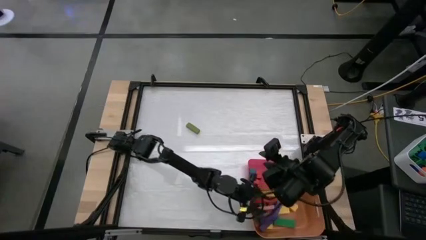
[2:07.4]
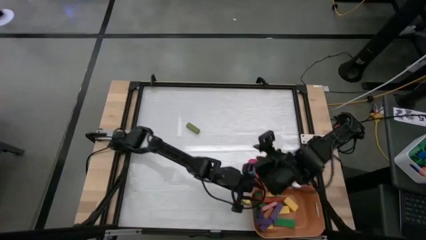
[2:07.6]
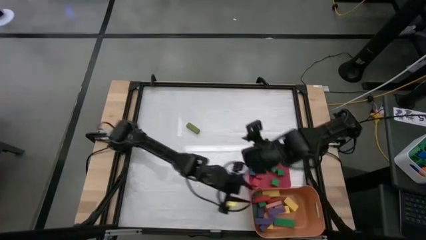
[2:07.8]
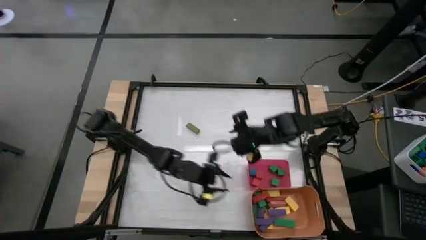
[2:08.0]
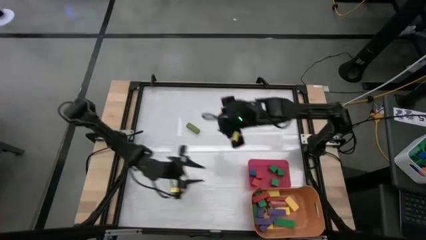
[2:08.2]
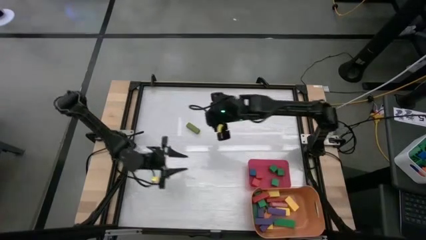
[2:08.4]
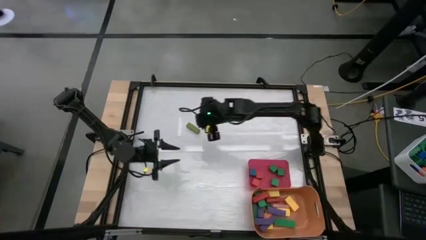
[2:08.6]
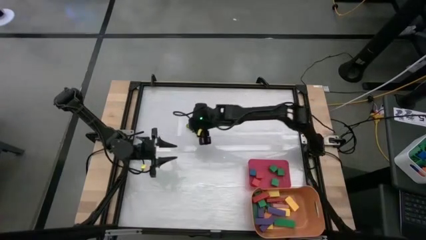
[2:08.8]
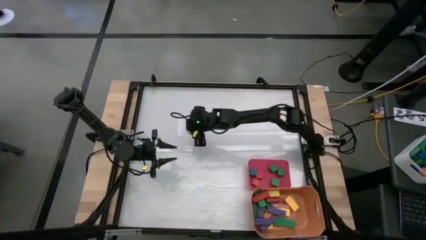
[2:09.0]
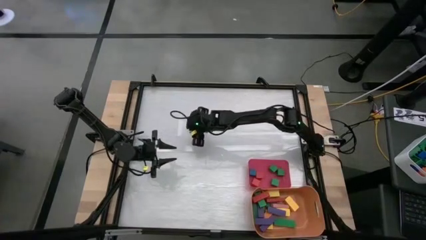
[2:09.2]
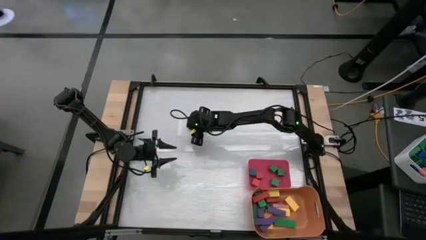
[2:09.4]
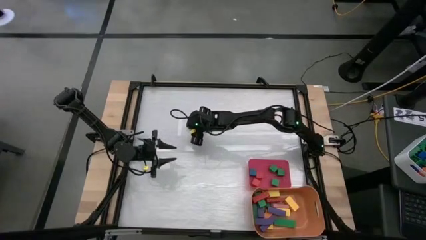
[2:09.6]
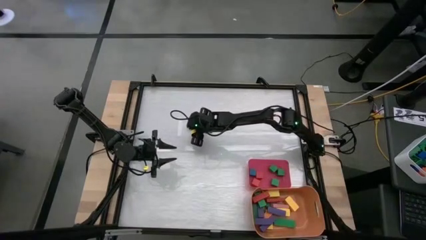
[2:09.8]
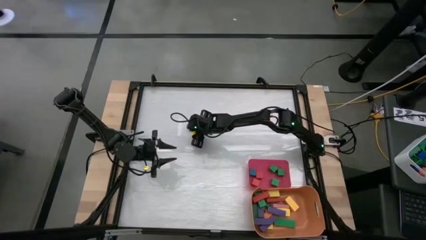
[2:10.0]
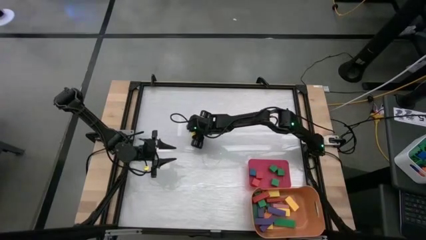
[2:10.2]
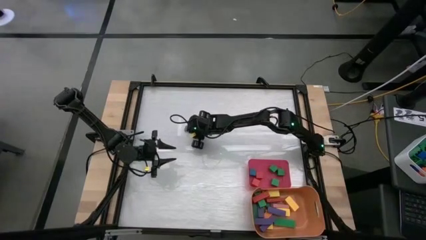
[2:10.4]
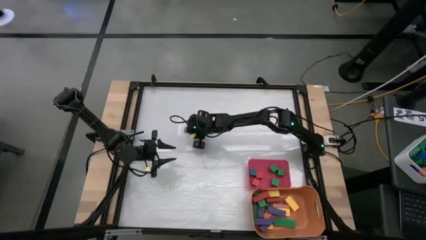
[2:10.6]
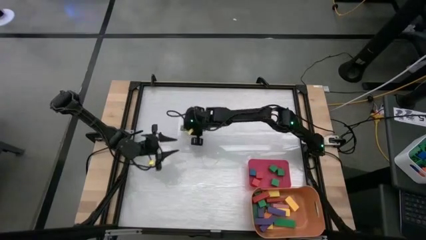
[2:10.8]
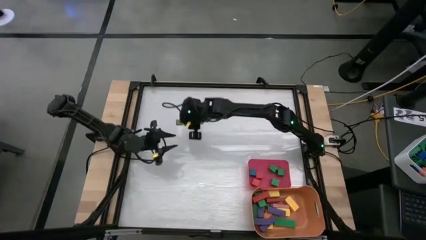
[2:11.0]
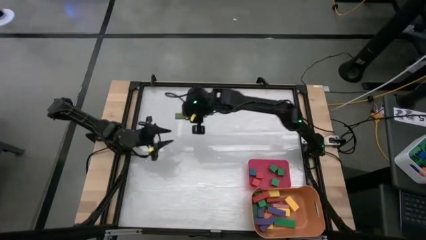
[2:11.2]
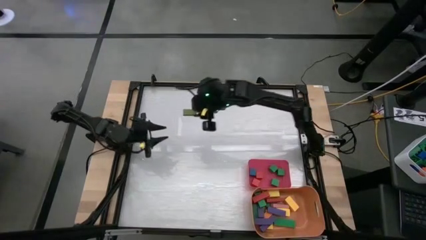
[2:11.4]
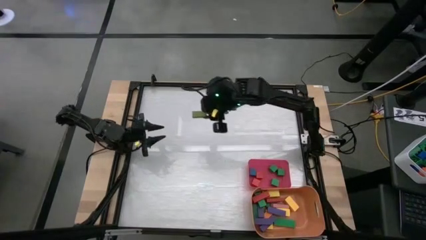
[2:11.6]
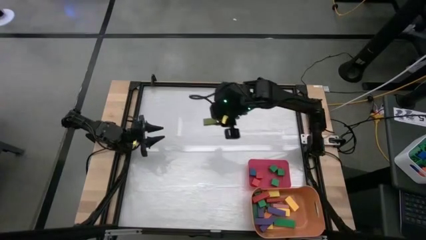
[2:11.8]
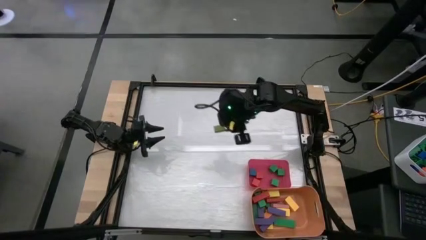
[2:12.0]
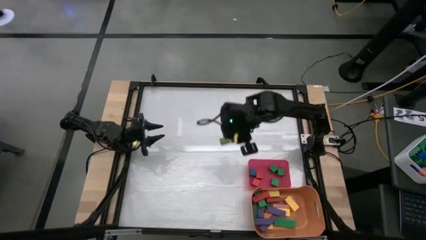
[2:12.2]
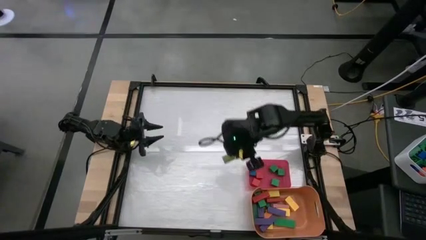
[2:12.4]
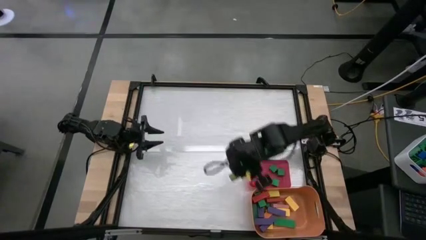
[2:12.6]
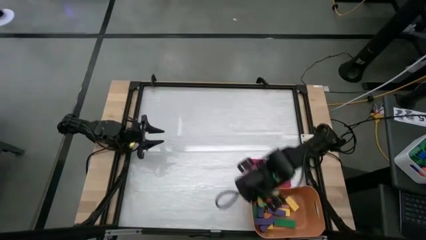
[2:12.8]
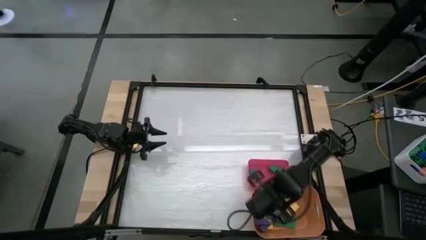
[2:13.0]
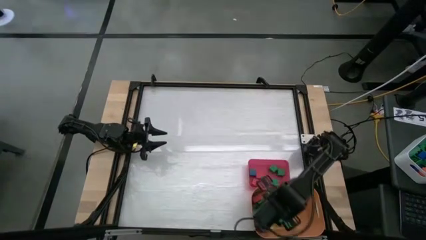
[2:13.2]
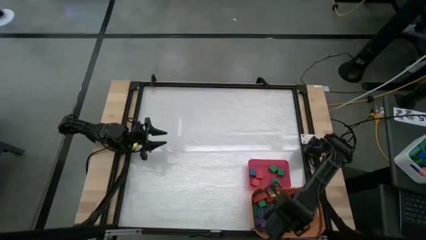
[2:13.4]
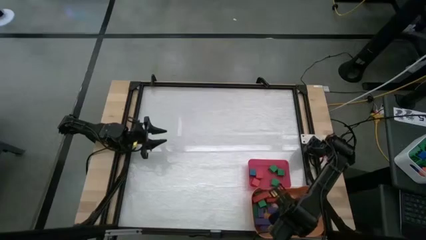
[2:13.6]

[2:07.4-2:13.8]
Task: Sort blocks by size
Put the light green rectangle block into the orange bin

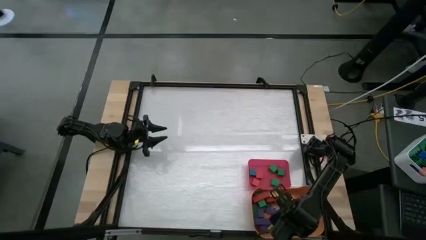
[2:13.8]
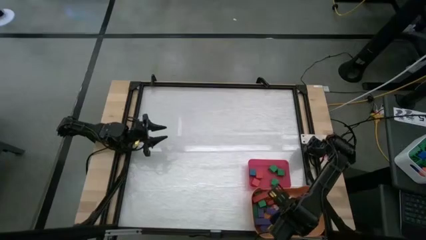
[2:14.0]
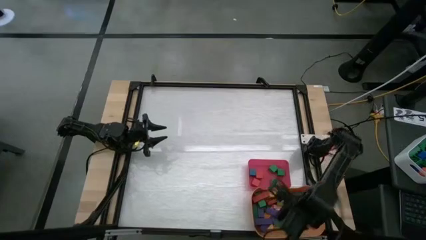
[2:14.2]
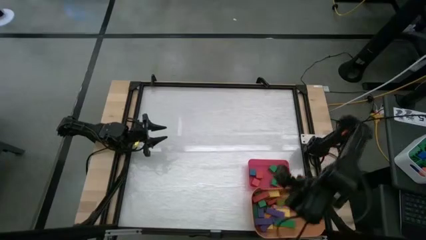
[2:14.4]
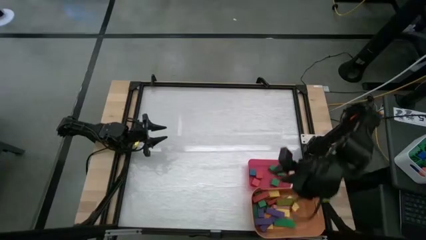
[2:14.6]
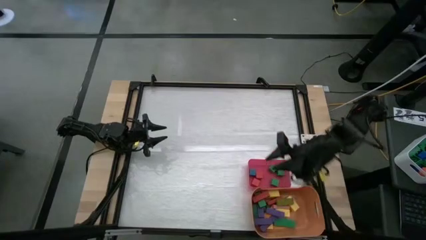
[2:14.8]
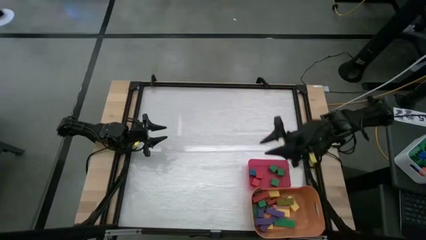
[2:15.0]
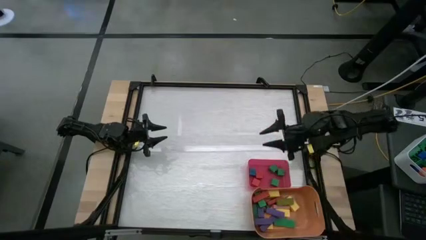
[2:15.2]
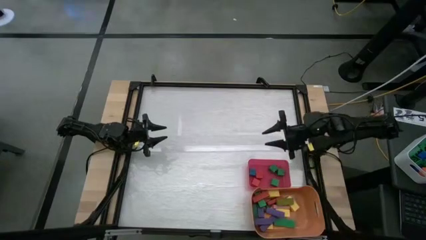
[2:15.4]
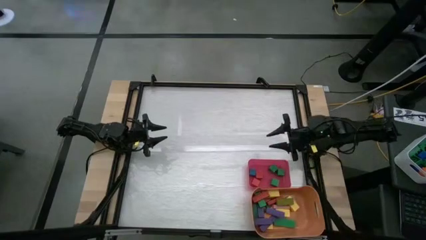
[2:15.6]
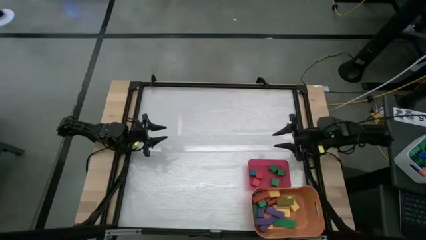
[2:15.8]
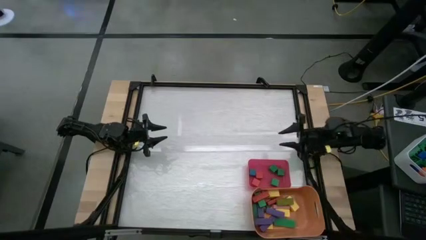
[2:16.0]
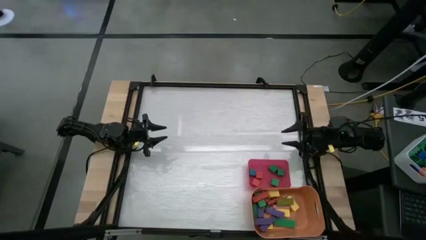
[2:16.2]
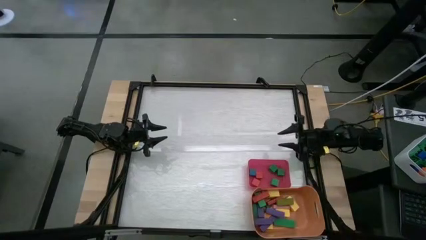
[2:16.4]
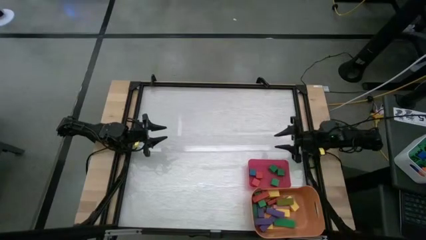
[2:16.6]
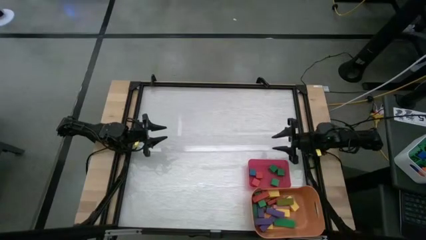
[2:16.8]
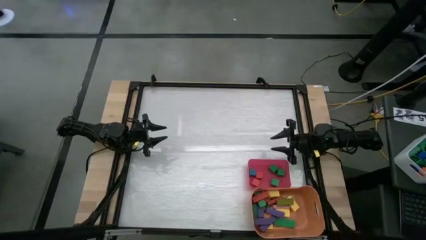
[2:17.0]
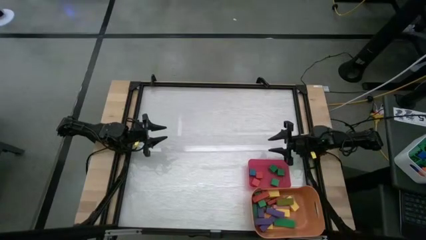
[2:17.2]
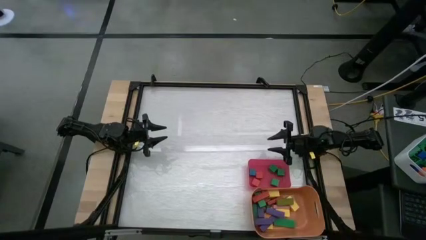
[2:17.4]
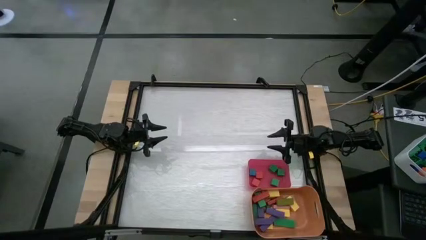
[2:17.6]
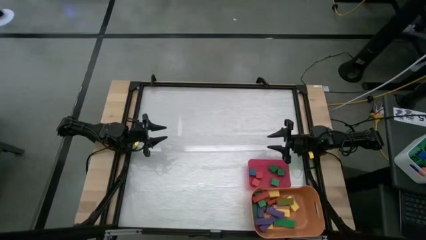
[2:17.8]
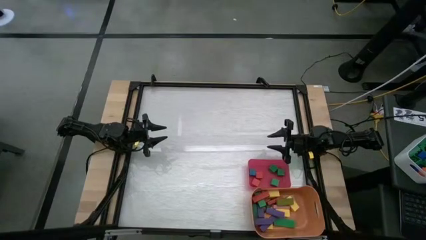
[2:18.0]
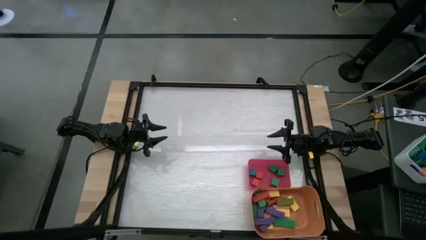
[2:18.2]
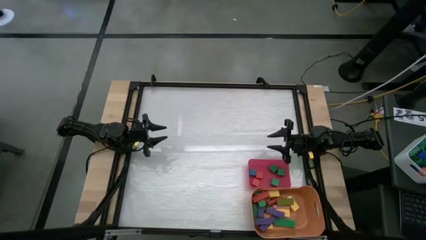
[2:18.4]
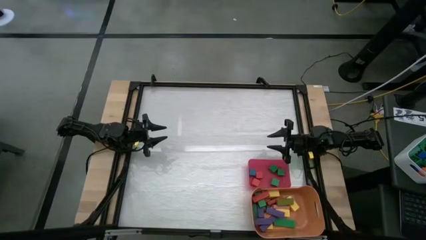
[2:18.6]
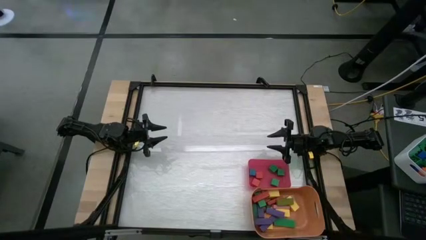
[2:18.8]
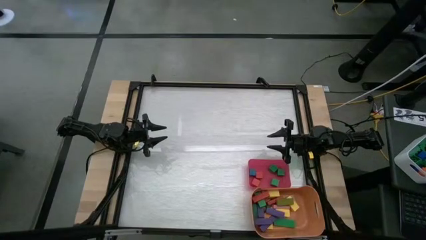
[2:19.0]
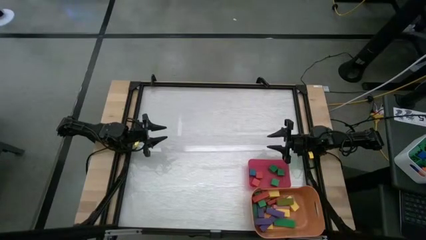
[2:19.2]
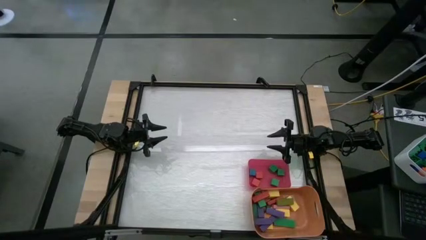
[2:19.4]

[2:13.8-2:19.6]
Return to Home Position

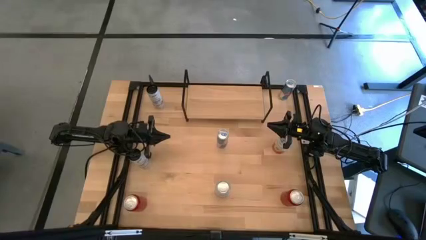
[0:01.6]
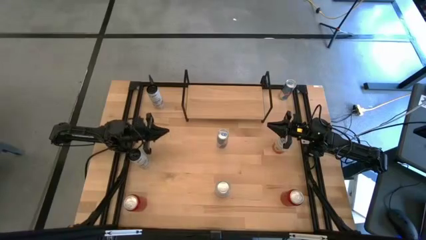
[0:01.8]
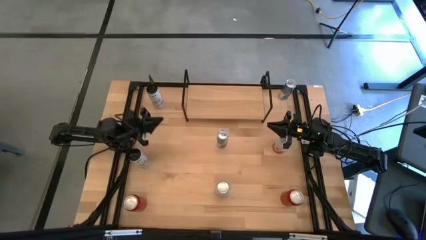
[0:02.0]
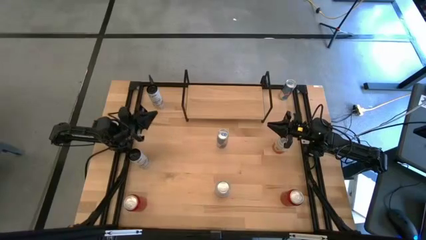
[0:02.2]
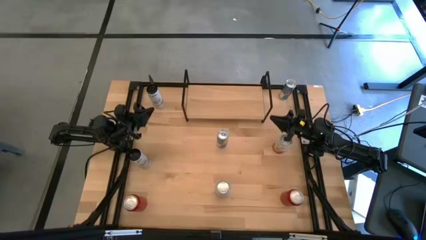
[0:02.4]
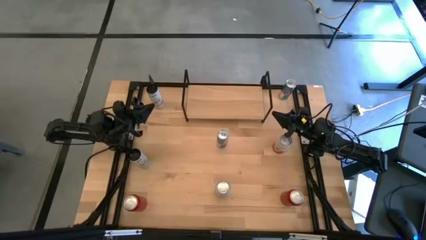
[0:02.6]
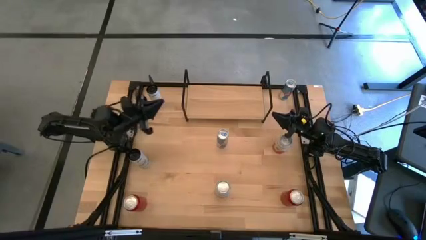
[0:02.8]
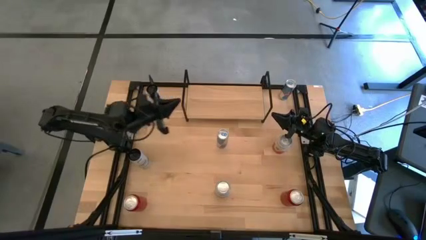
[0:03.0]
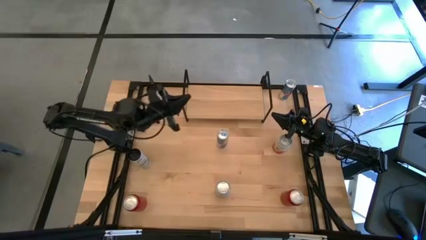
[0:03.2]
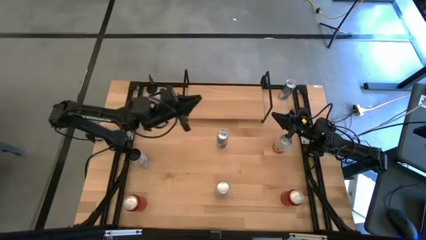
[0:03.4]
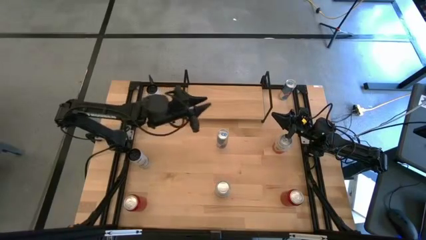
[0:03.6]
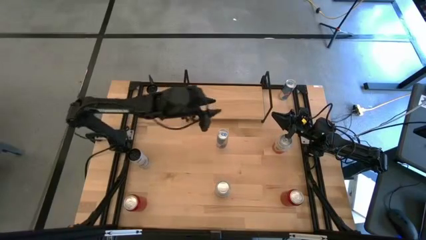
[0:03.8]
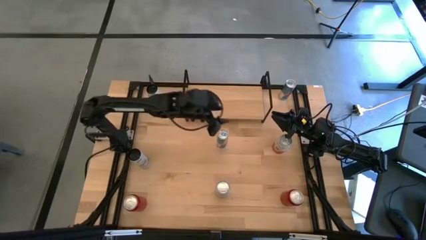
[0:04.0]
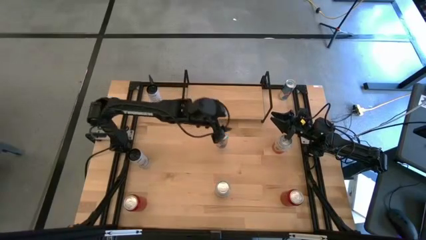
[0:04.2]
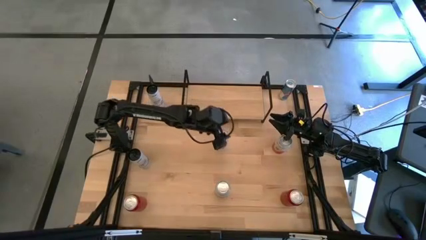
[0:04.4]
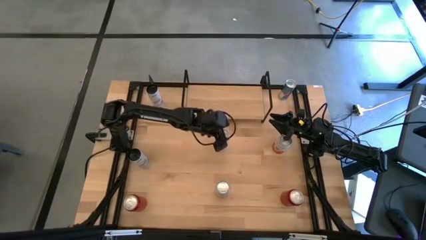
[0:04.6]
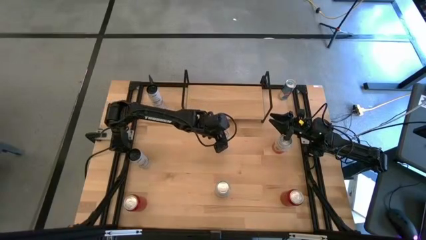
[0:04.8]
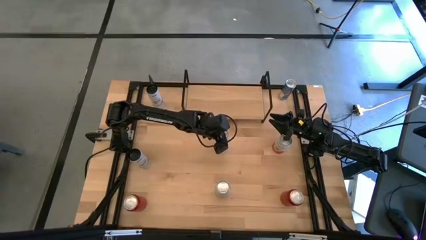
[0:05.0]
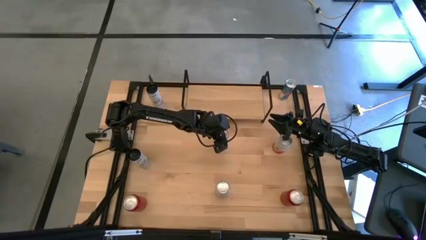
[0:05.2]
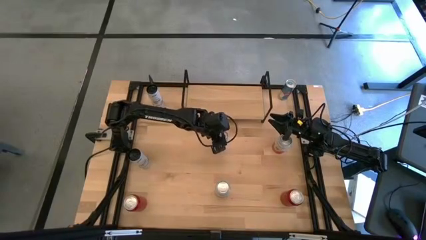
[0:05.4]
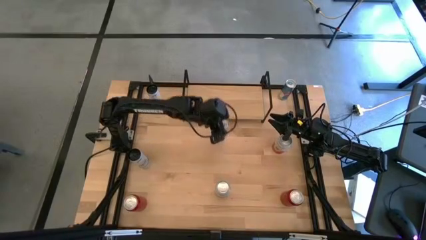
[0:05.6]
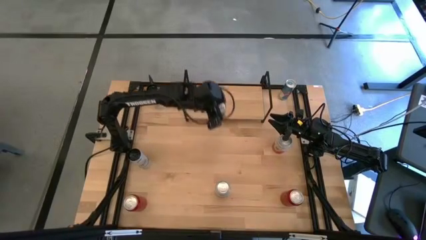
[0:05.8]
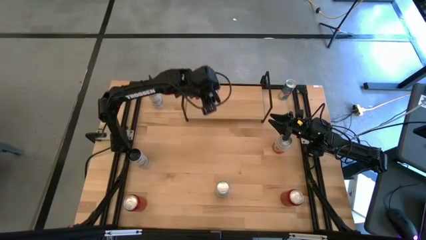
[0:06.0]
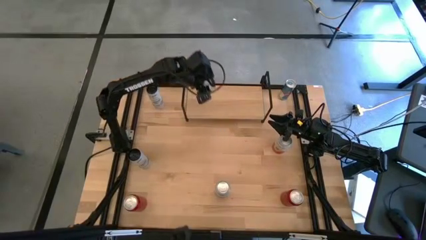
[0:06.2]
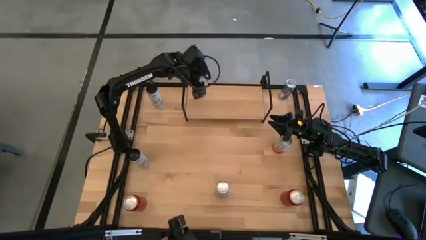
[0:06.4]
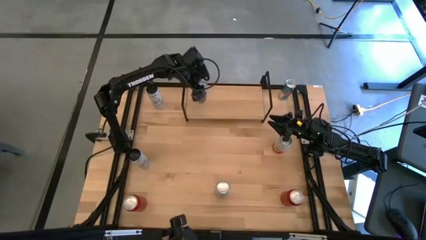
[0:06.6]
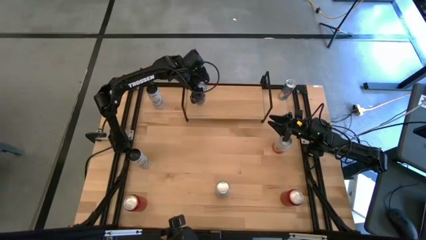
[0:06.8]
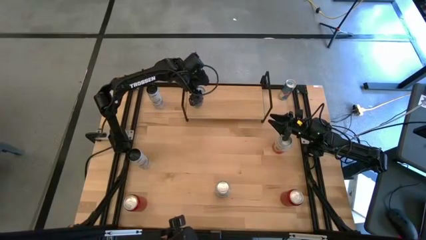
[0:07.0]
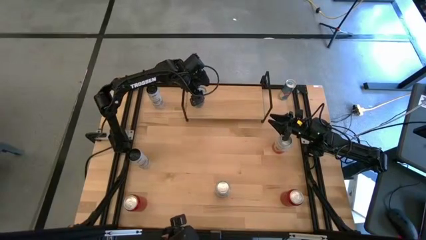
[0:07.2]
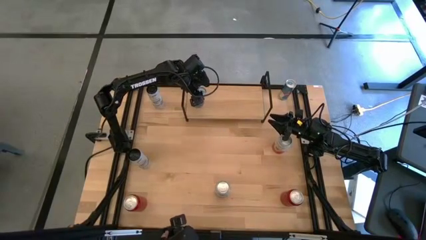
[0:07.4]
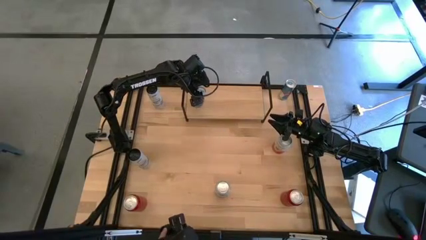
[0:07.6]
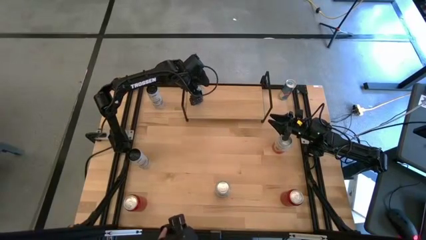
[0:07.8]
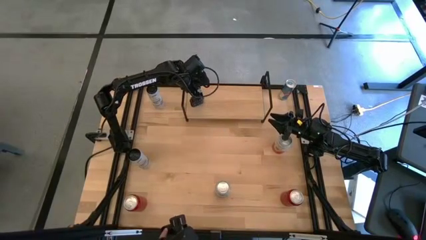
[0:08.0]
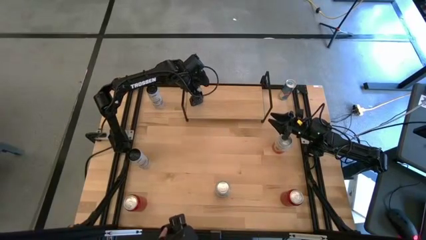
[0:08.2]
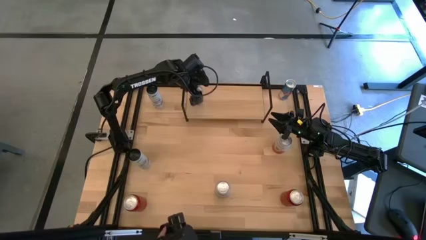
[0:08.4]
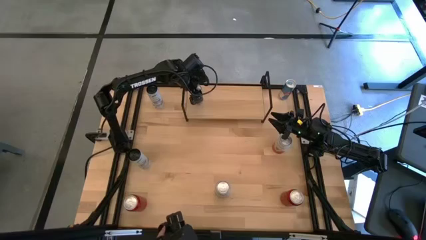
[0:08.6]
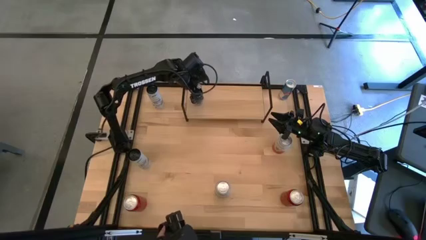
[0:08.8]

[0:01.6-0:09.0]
Task: Place canned beverage on shelf
Put the bottom blue soda can on the shelf
